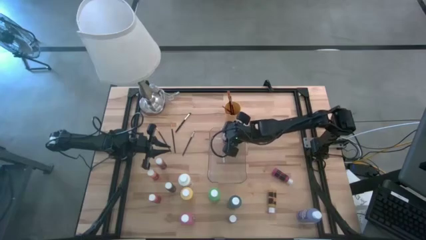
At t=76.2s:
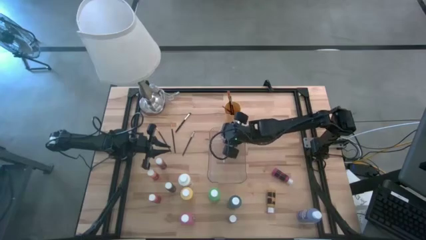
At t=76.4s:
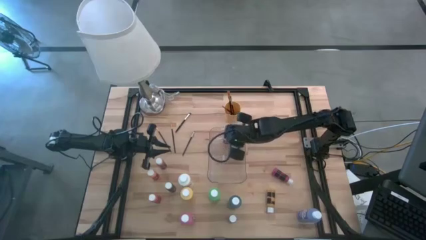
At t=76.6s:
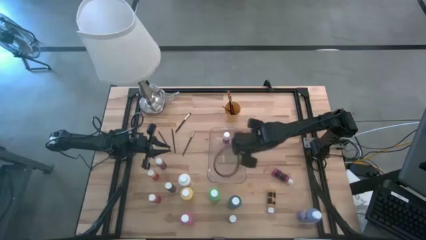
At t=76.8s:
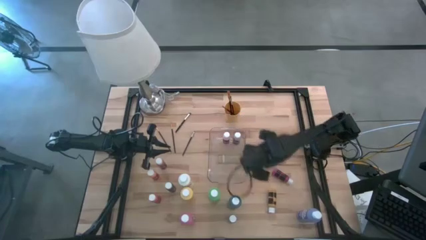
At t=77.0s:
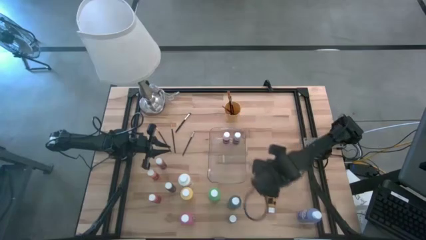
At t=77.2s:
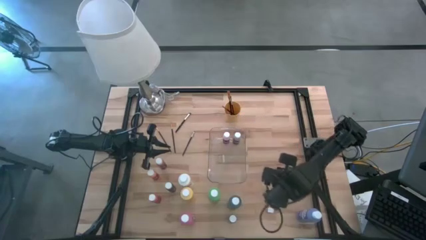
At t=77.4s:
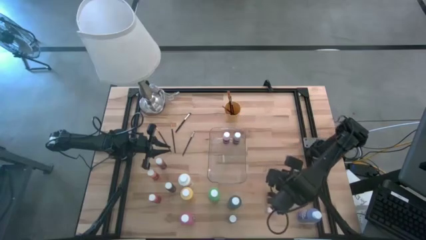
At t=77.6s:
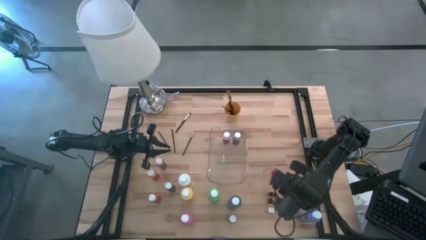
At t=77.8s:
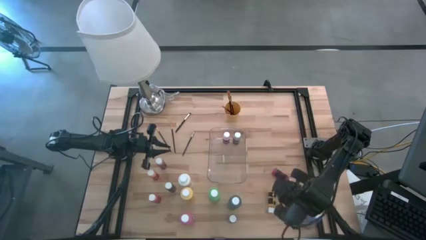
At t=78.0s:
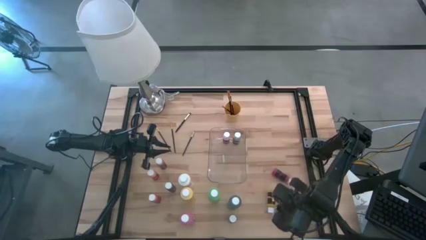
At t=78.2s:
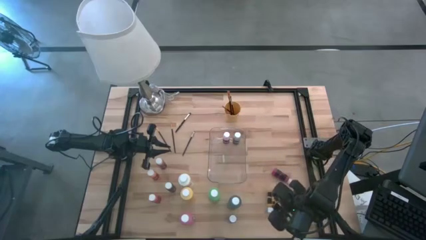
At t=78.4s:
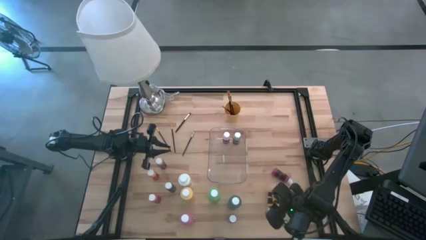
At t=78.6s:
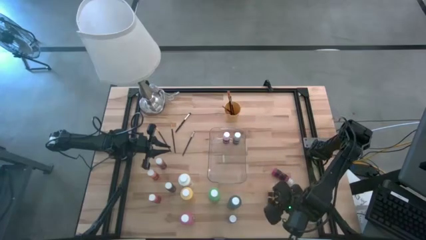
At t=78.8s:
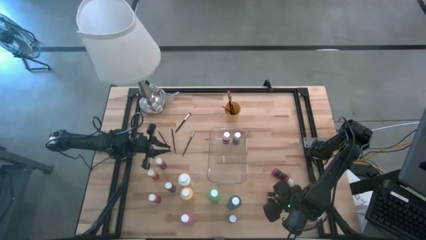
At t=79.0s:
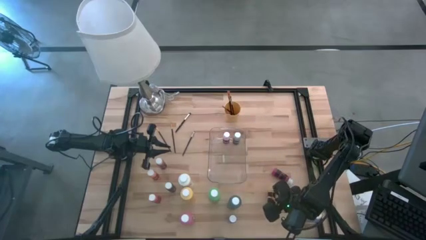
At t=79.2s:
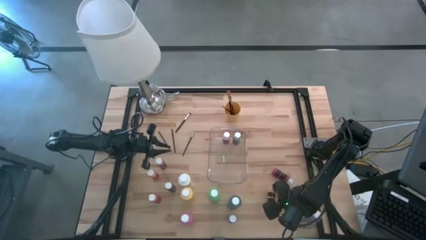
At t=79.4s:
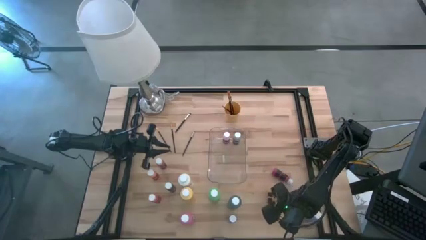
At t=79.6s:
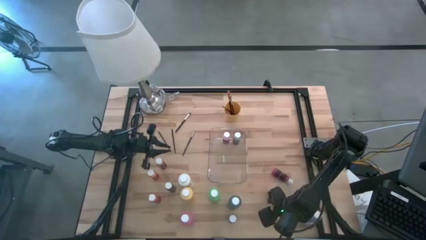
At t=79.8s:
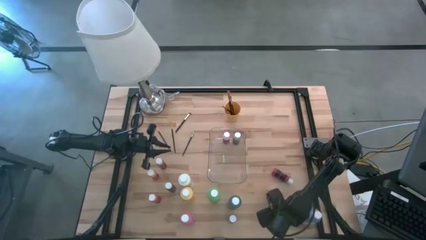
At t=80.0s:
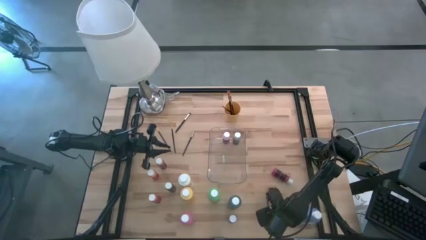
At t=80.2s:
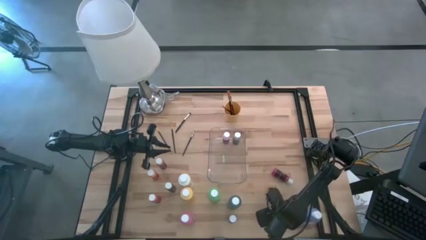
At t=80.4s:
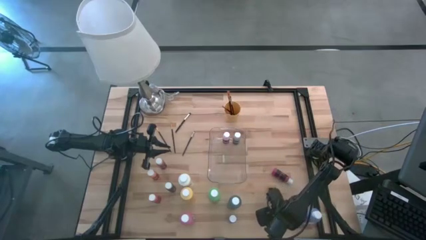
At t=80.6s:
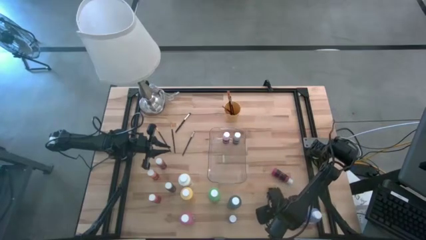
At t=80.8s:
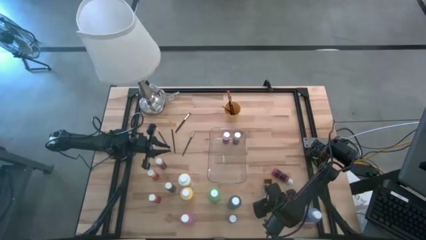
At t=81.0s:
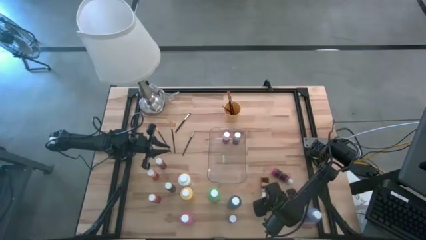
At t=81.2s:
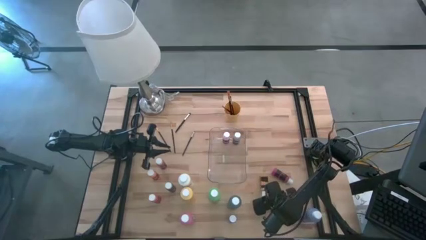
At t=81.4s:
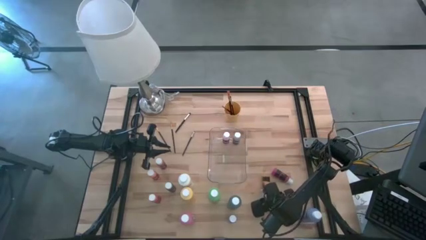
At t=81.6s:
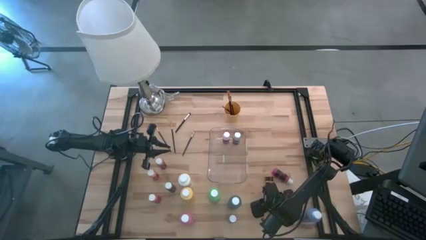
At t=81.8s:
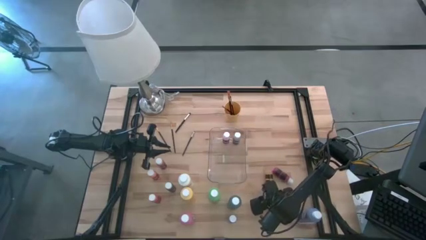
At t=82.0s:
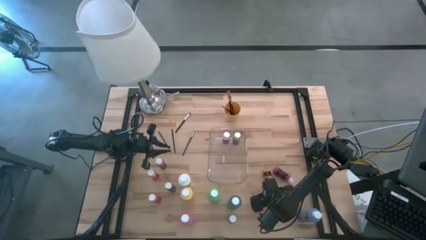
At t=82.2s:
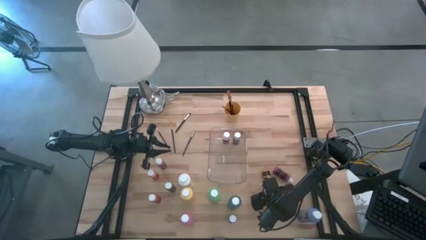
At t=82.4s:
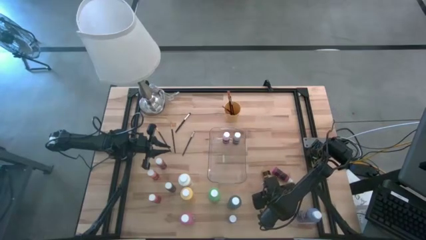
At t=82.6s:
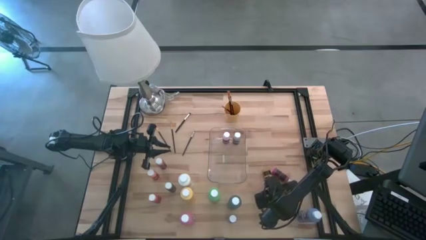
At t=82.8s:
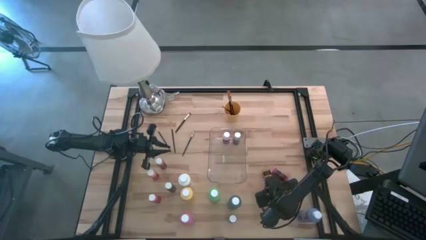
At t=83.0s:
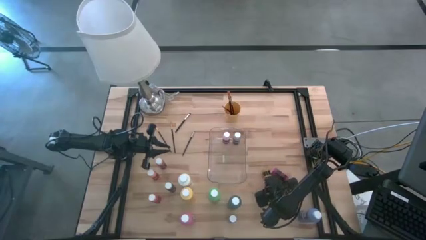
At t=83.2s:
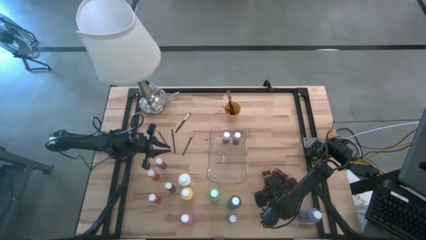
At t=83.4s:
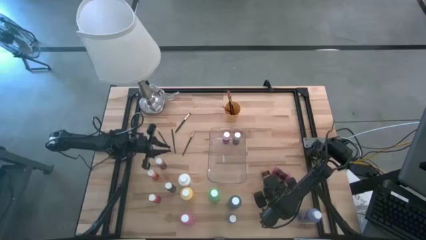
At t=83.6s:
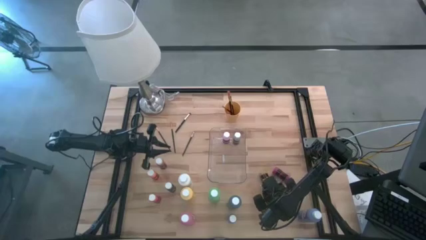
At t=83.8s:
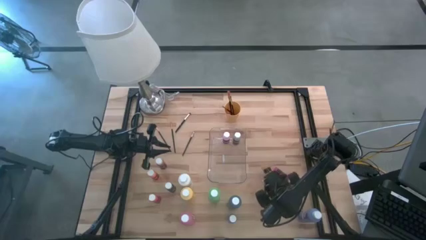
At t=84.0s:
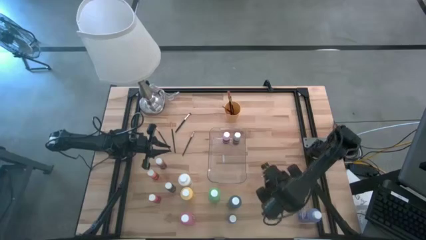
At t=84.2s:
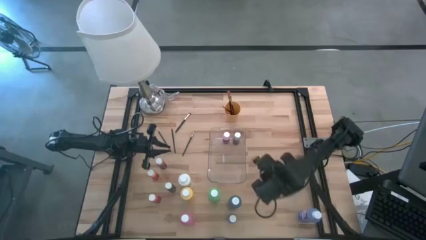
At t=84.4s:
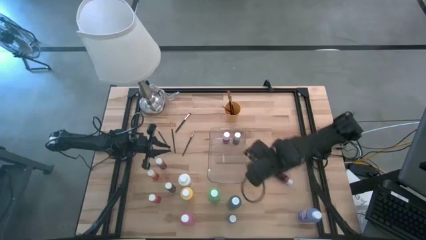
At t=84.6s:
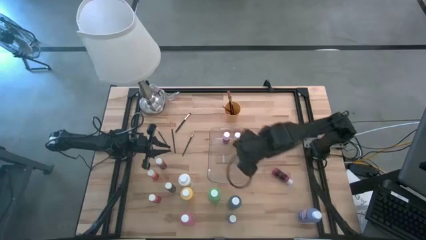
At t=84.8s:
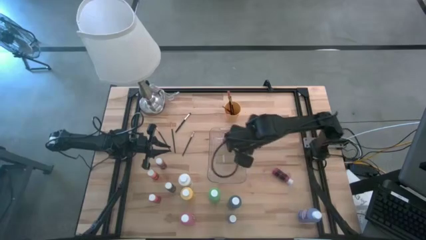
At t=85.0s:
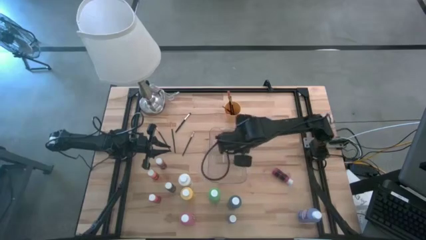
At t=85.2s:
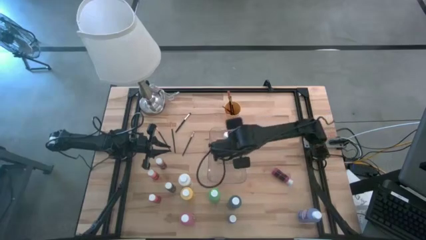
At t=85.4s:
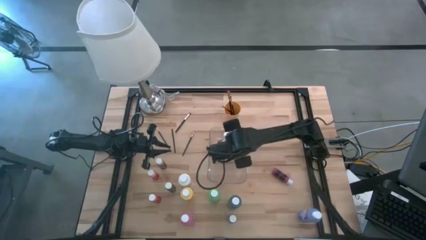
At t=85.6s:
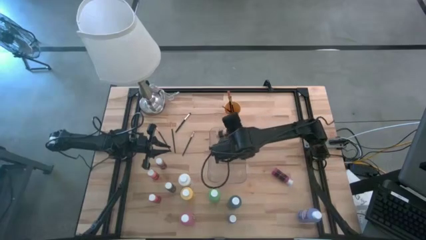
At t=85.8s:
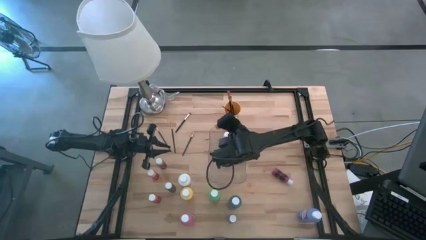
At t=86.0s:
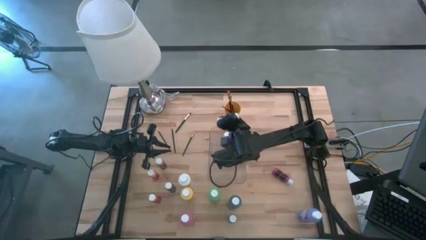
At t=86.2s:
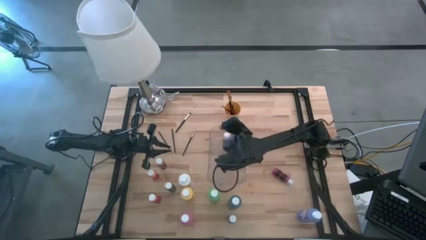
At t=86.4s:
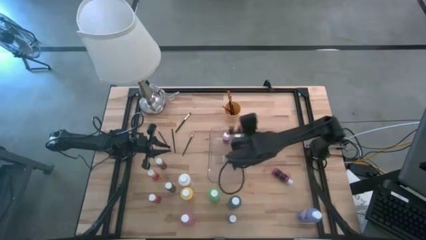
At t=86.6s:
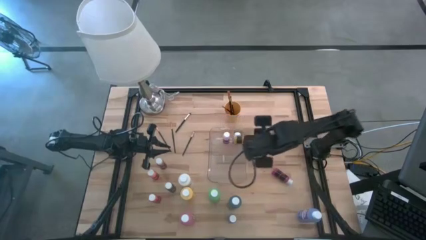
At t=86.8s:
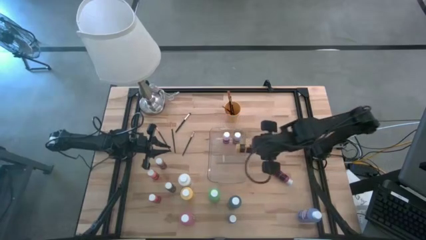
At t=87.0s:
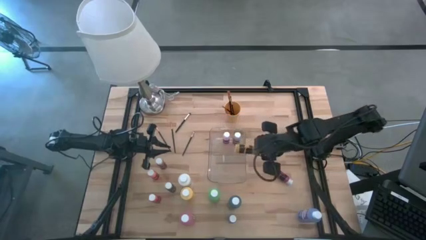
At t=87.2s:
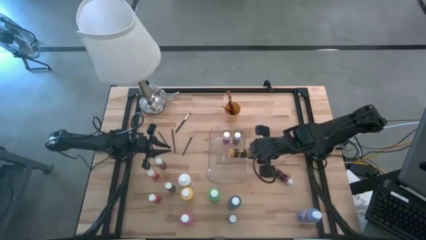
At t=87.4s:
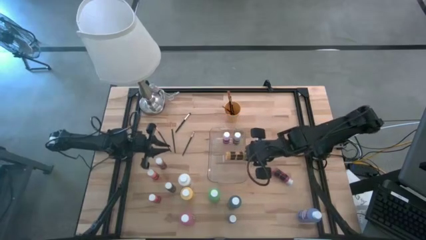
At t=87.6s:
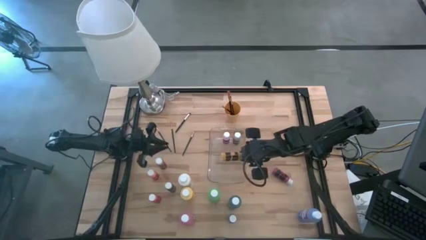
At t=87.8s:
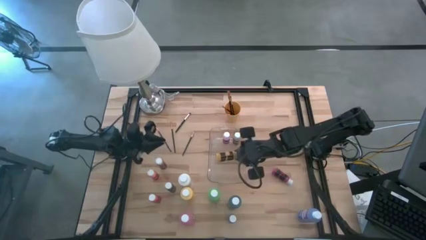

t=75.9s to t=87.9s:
Task: Pick & Place Paint Supplies
Put the small yellow paint bottle into the transparent bin

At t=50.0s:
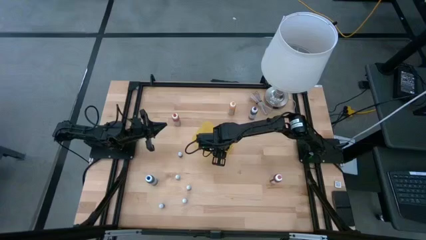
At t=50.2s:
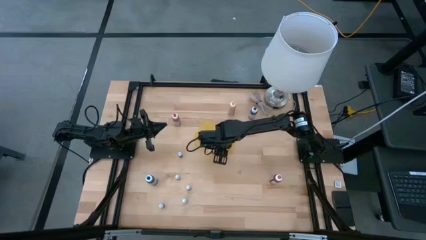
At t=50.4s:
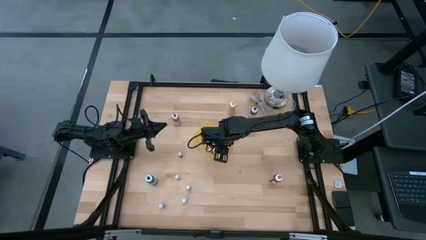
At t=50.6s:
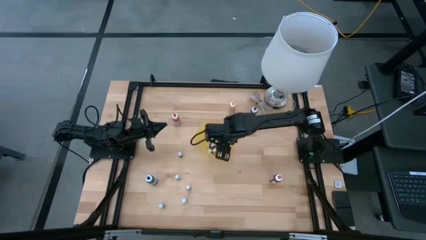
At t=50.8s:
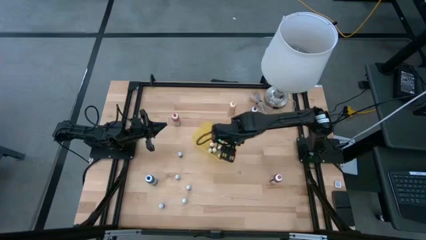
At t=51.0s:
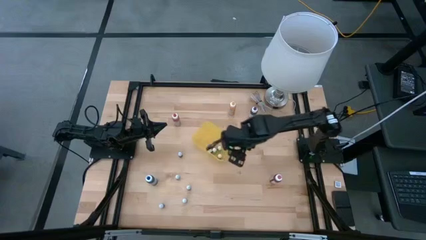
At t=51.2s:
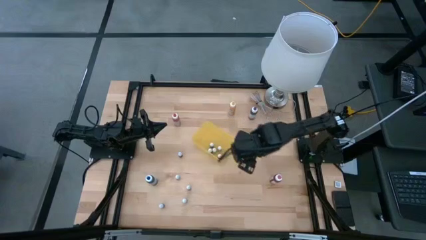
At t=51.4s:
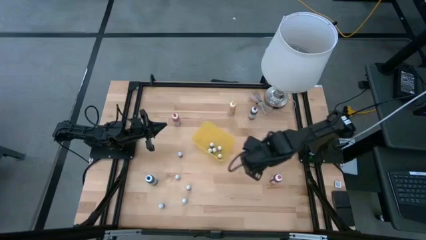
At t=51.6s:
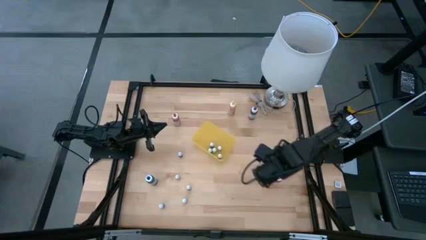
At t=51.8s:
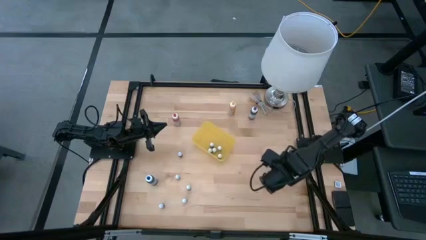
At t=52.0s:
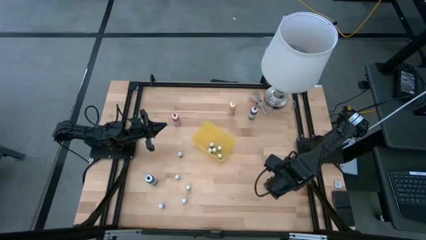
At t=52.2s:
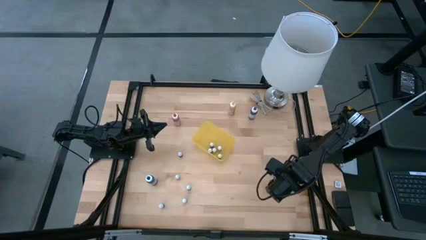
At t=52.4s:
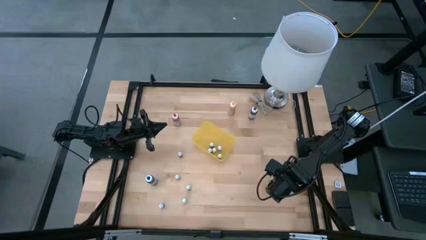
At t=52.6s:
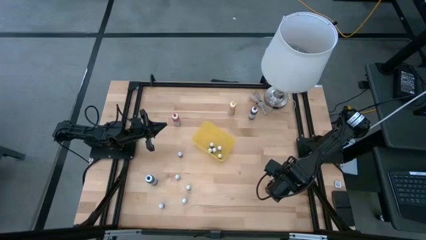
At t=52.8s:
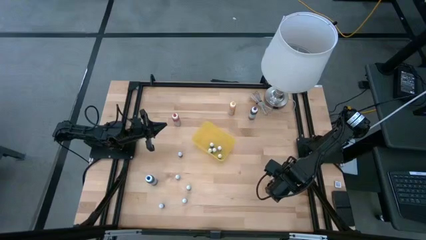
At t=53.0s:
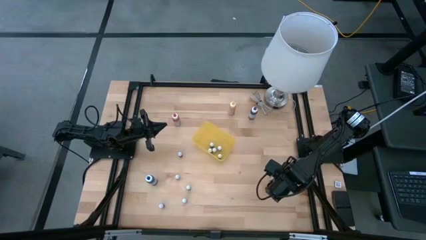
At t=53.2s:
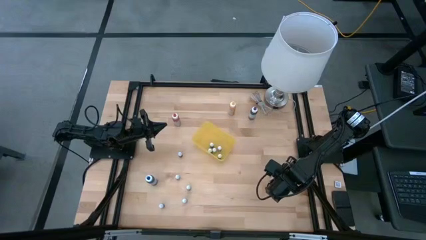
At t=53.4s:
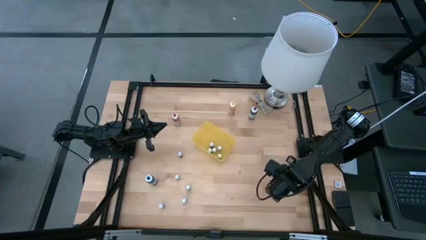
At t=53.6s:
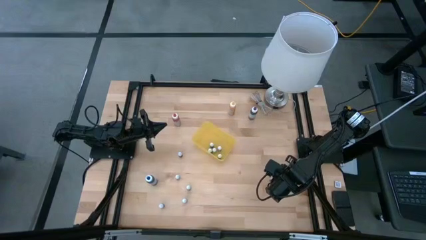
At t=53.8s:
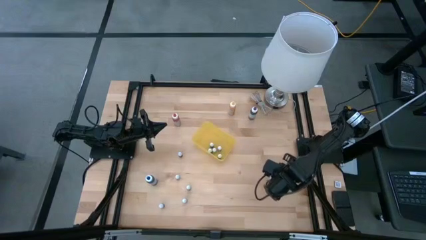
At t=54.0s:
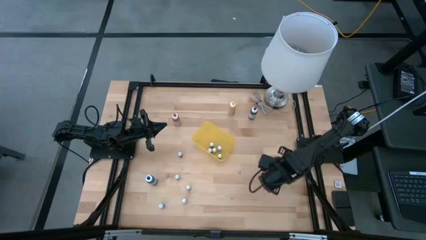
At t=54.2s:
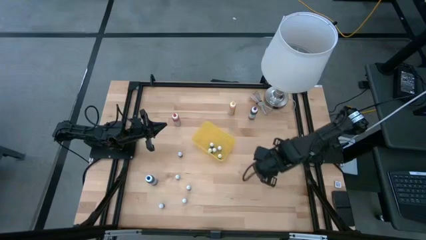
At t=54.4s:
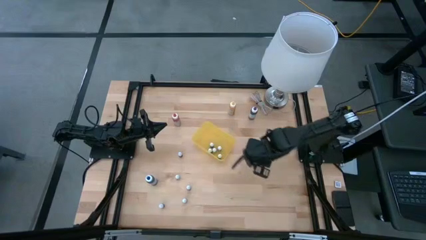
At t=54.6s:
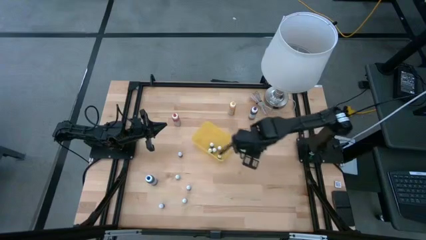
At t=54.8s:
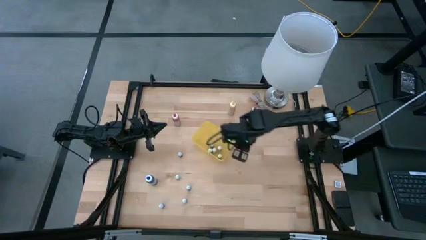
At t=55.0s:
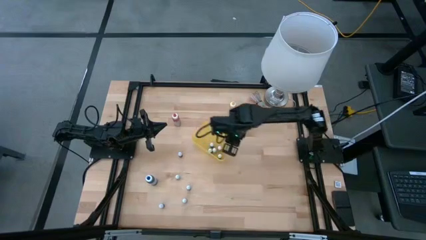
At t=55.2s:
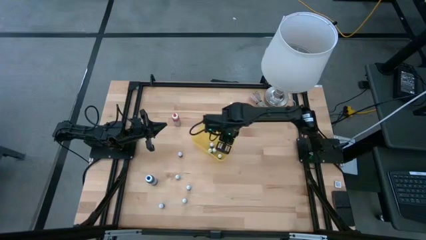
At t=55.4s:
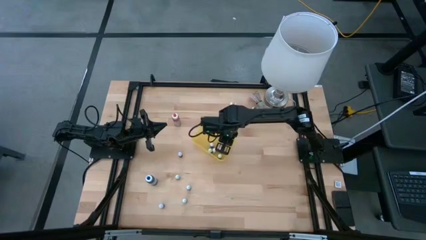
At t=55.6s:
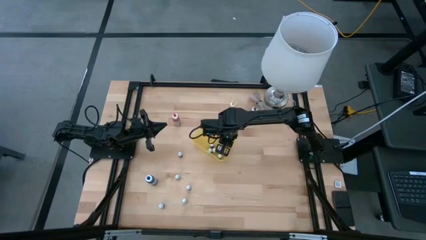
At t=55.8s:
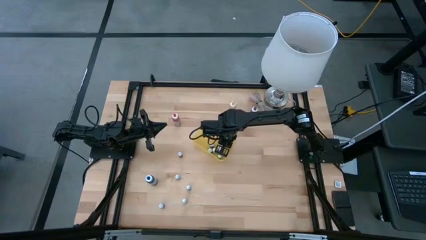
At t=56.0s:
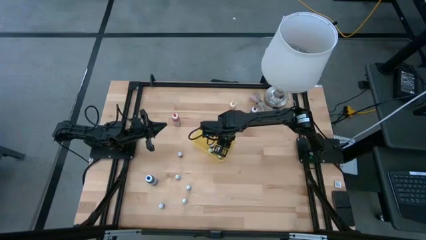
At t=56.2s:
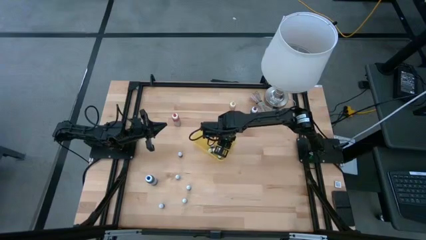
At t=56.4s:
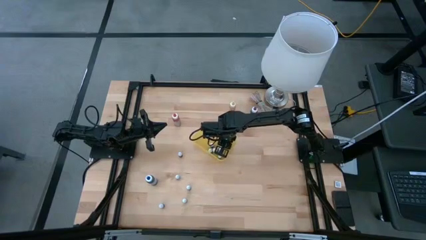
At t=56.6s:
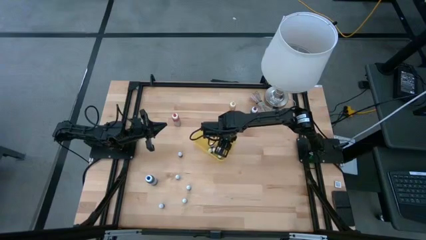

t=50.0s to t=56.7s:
Task: Pick & Place food coloring
Put the large pink food coloring bottle into the yellow bin
